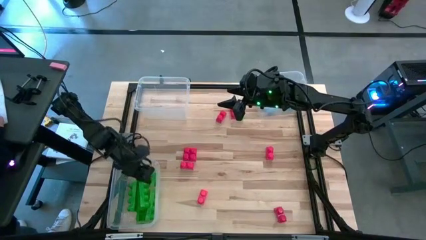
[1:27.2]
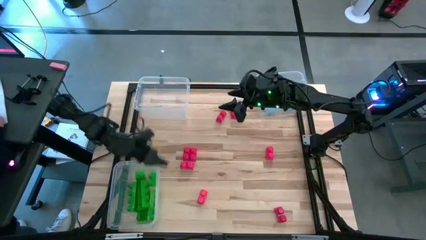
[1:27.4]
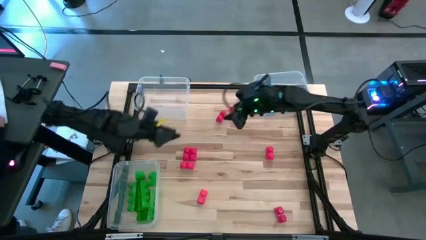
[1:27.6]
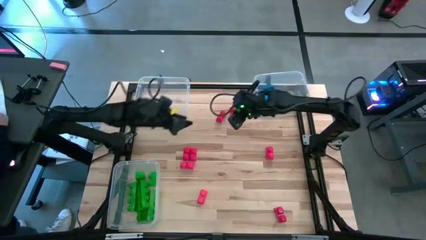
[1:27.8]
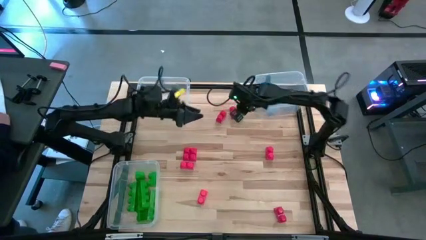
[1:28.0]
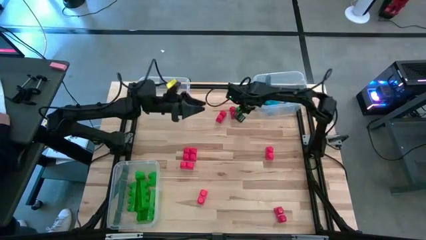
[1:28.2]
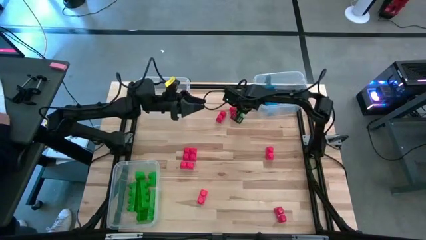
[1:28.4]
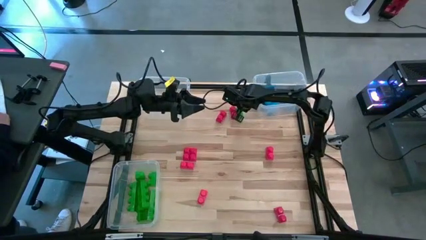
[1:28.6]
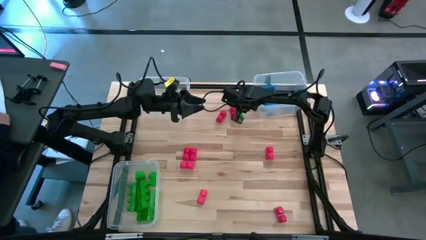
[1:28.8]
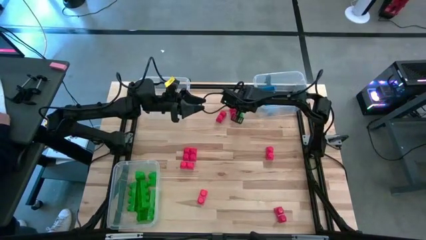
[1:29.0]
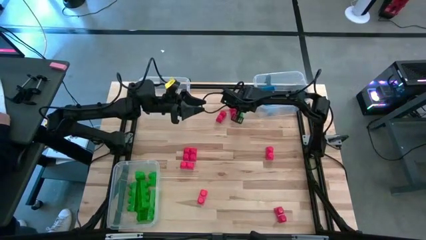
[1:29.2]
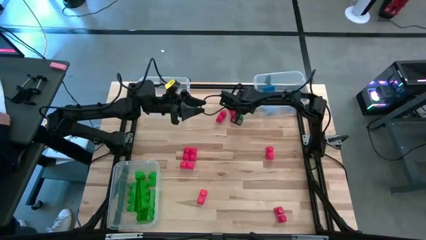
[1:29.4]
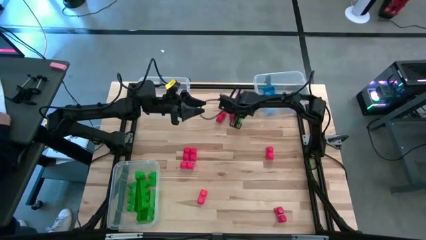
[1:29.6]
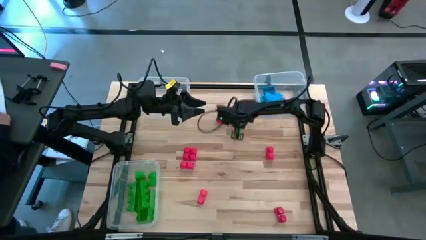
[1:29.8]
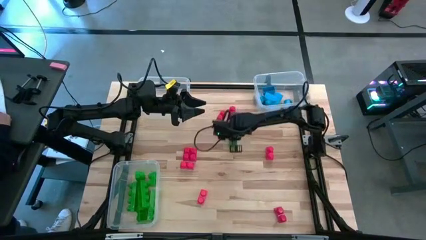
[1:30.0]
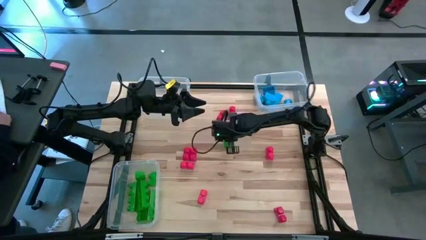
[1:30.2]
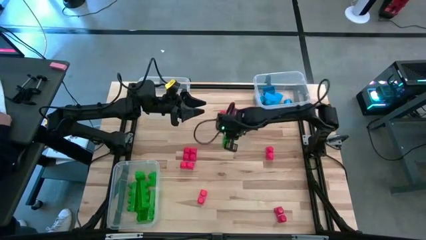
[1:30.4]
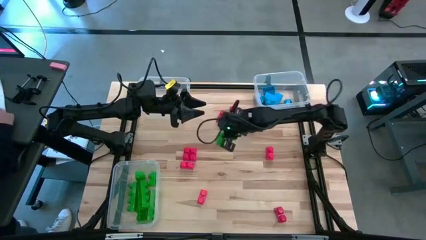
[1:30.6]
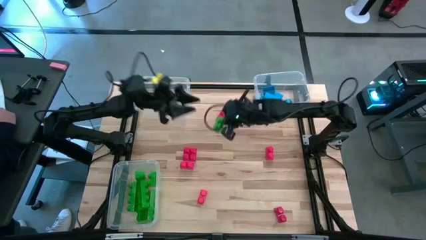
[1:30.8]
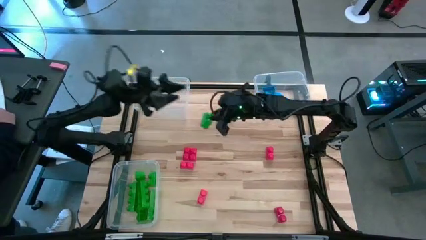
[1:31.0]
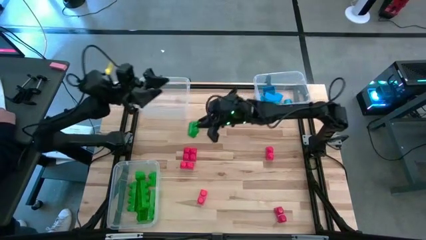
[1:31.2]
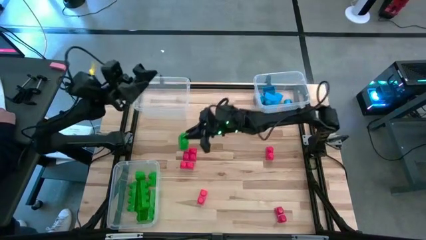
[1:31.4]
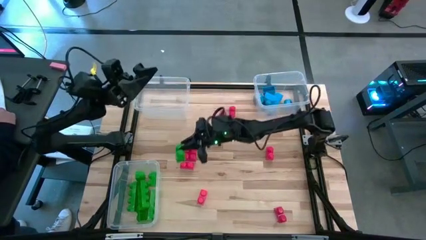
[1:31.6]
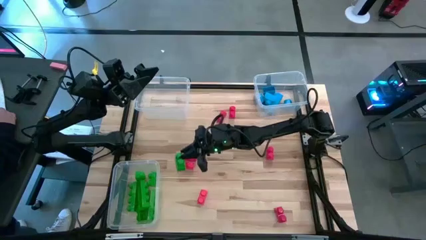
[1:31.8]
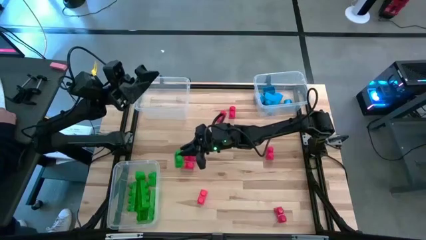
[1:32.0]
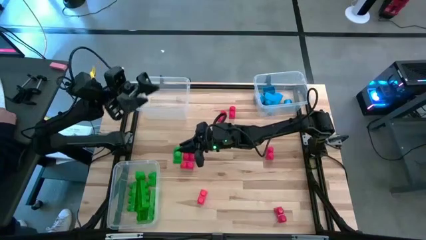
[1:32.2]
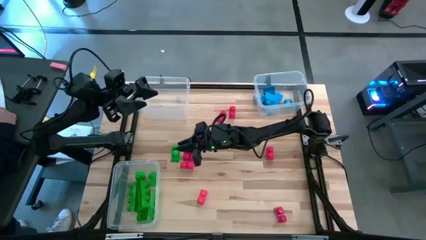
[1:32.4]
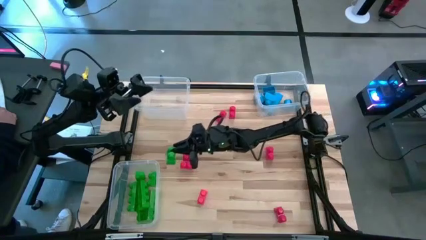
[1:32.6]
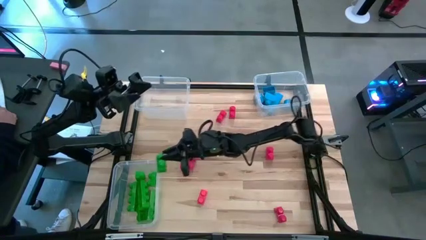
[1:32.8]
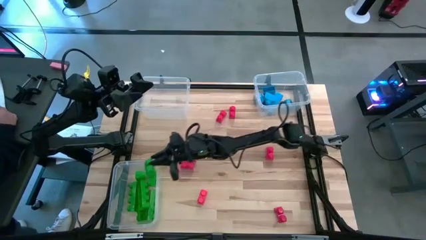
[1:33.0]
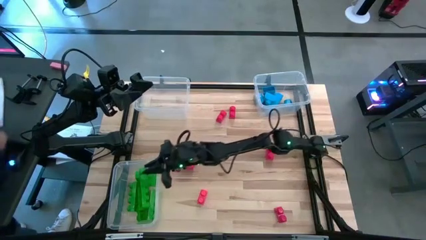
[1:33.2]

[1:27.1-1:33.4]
Task: Sort blocks
Put the green game piece into the bottom left transparent bin

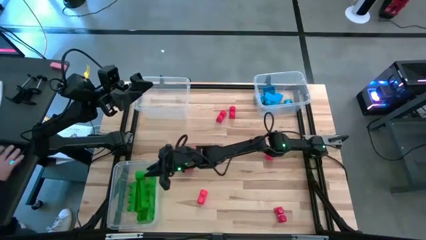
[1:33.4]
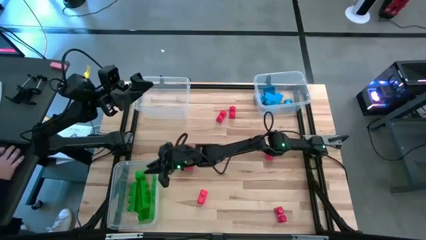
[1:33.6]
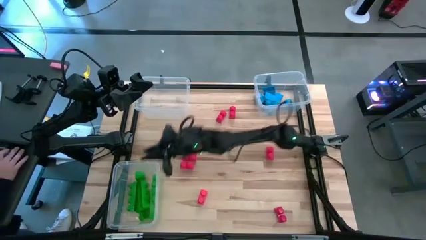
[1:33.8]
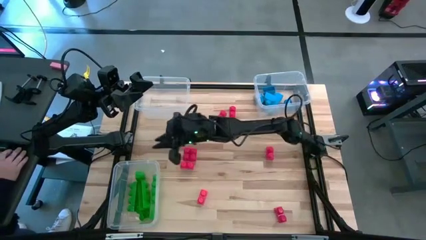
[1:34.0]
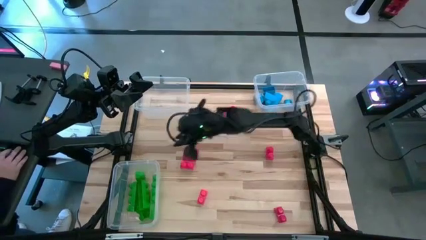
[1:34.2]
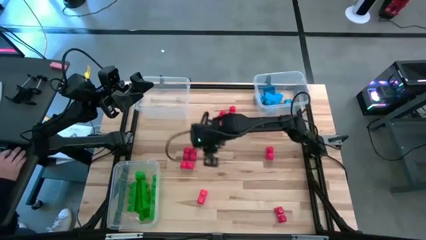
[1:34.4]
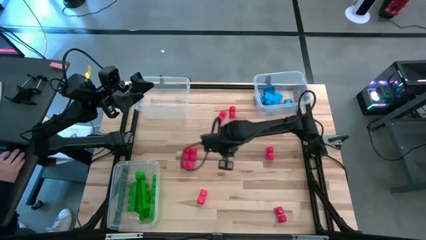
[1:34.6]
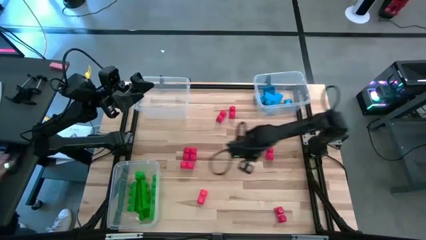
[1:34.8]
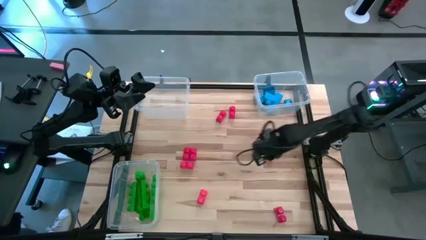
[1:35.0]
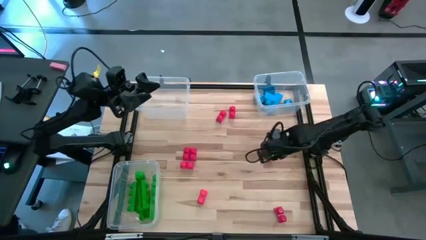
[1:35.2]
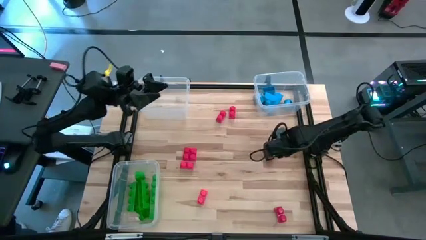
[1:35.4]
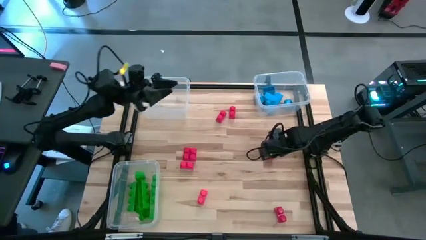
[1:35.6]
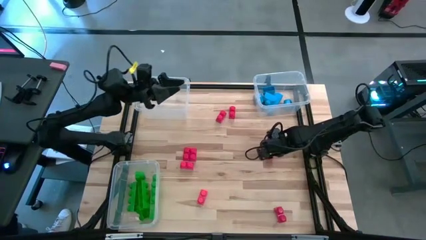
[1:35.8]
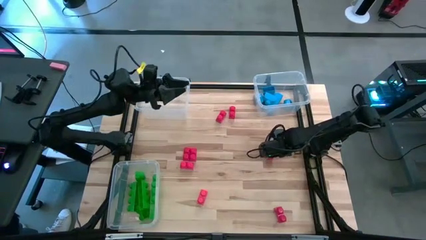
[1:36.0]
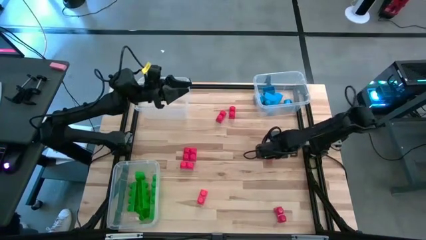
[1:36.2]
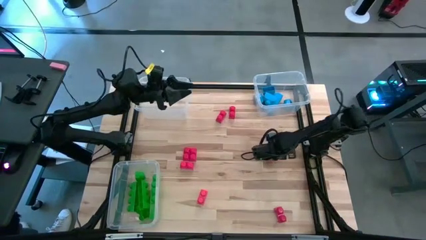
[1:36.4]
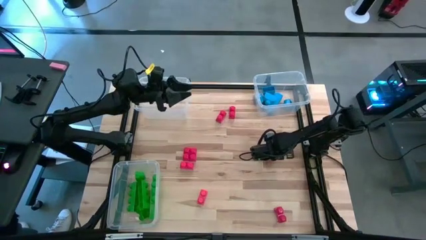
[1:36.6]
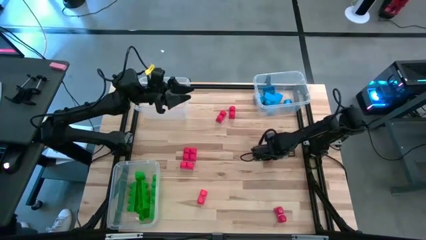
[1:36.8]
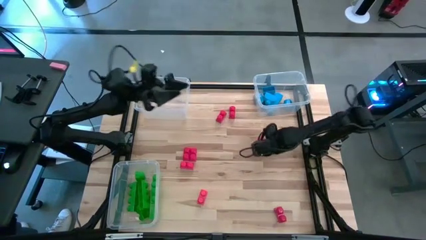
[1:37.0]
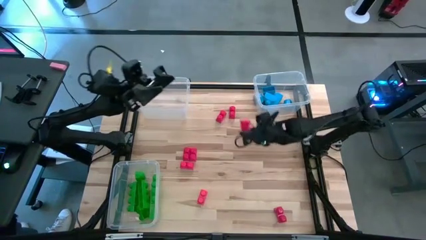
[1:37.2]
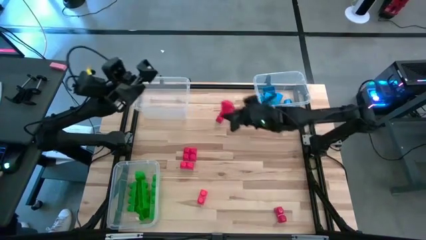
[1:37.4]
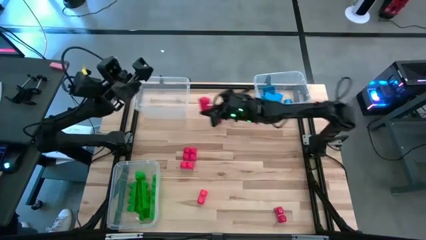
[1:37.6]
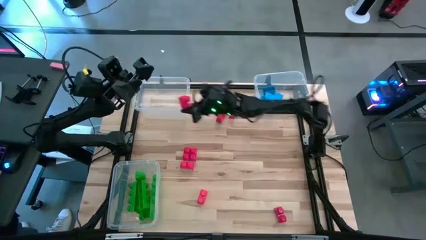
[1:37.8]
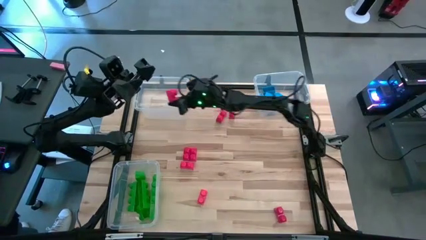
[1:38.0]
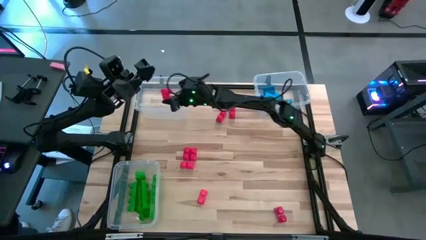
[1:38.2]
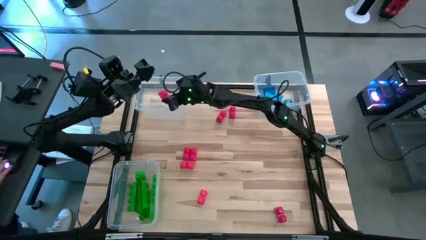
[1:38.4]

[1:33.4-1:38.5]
Put the red game piece into the top left transparent bin

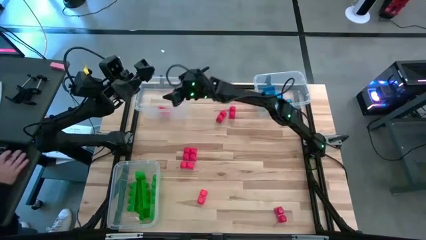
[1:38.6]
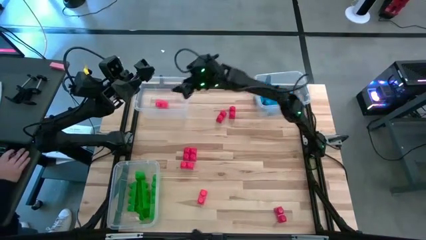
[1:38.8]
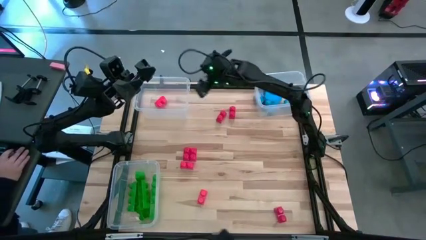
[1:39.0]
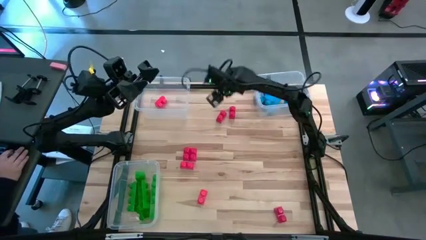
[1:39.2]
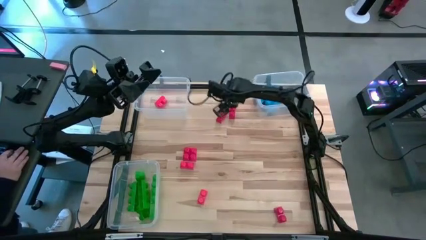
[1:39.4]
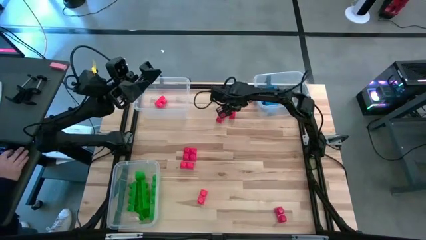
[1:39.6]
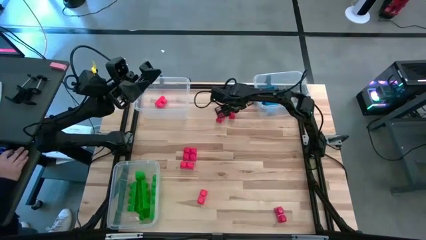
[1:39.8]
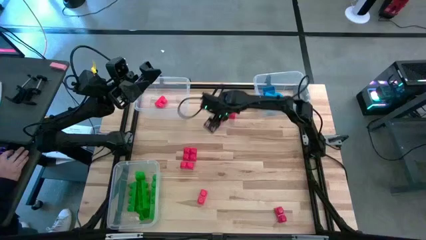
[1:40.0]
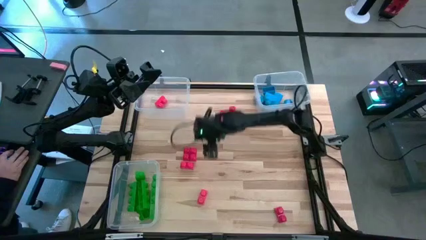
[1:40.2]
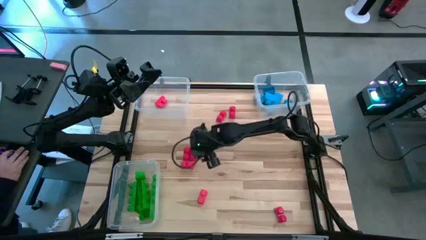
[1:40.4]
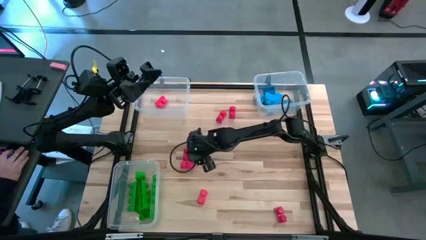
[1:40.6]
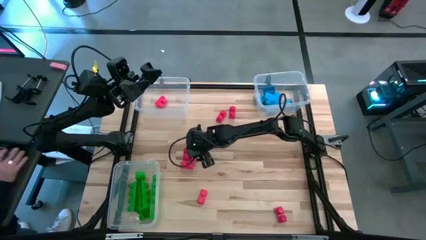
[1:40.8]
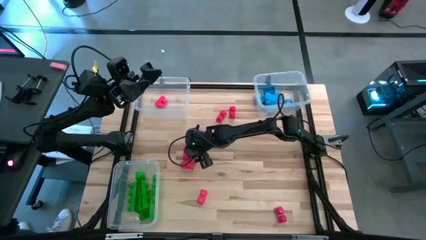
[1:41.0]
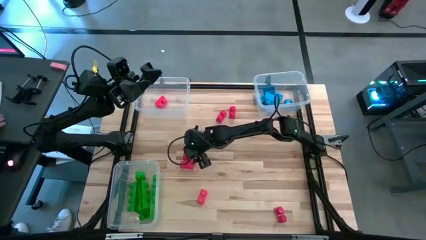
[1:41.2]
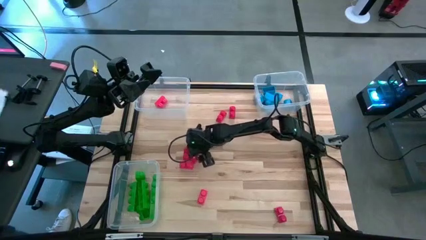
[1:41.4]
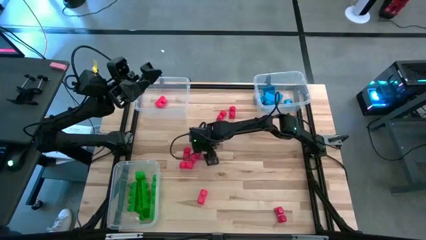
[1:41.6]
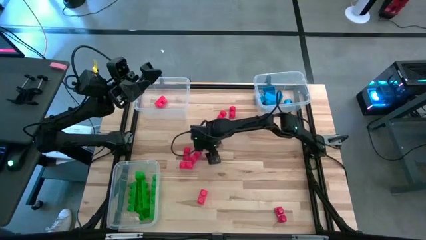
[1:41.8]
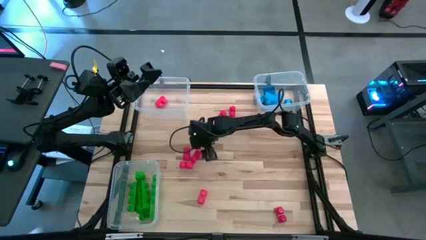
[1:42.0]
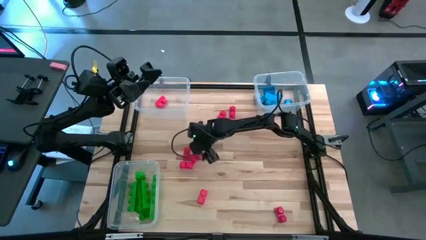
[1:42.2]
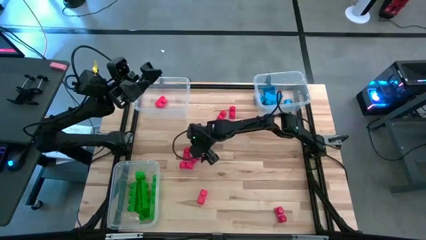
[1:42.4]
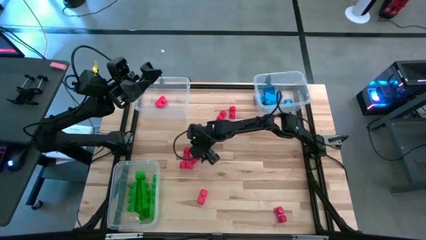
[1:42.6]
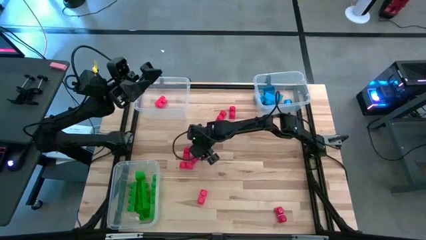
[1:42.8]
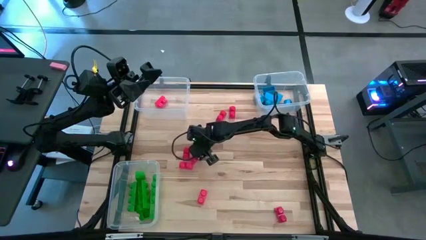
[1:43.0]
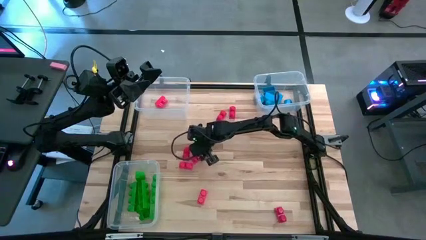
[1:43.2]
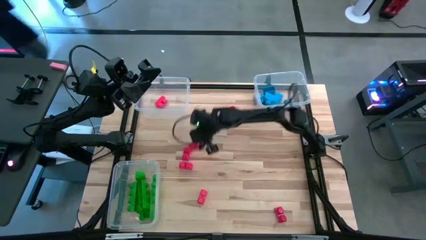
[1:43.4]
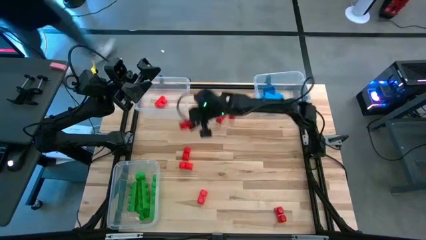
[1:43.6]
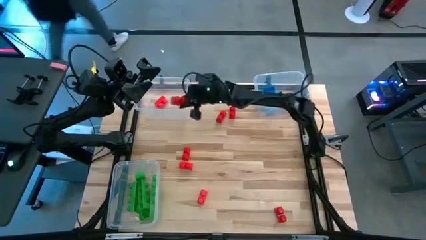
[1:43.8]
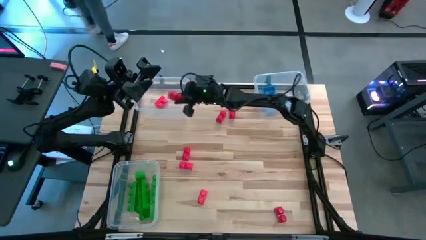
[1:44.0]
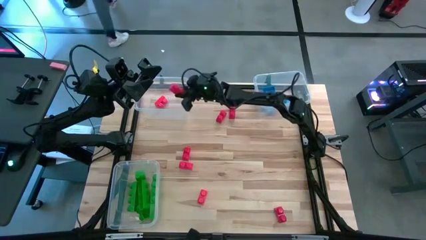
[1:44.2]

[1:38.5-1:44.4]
Put the red game piece into the top left transparent bin
